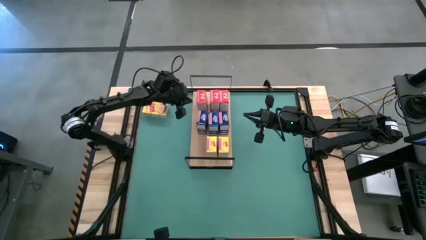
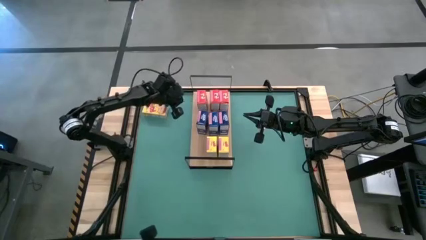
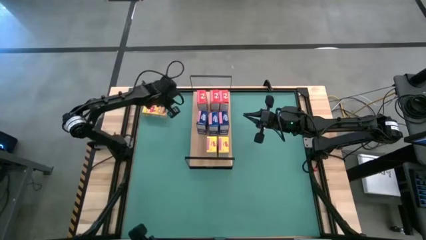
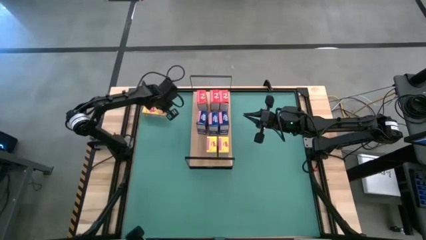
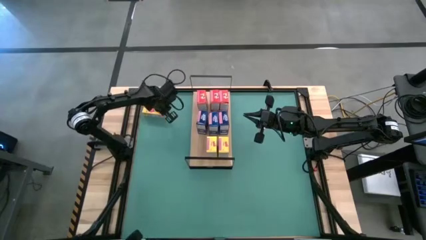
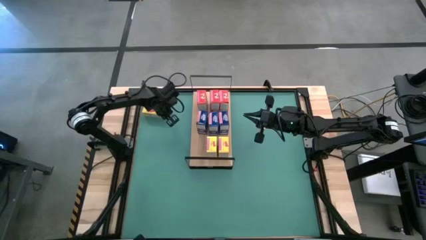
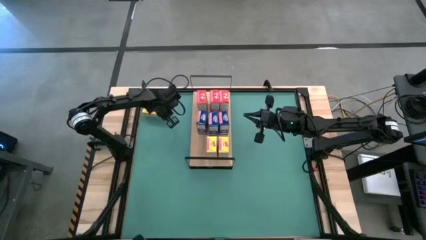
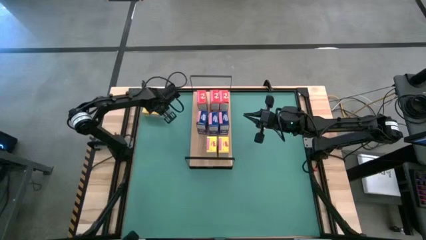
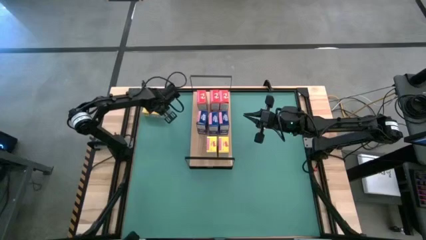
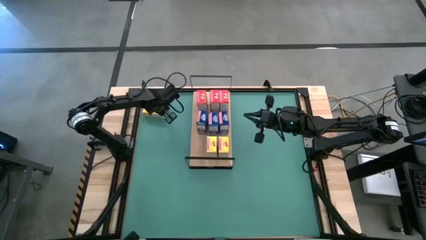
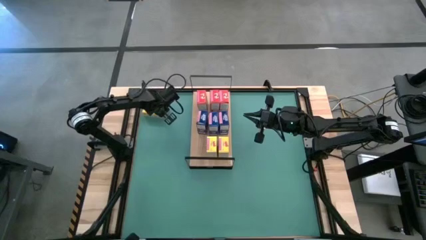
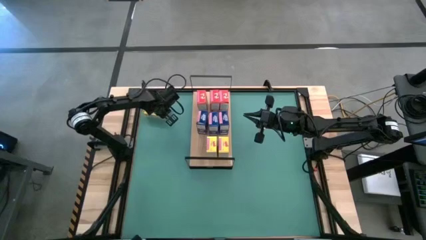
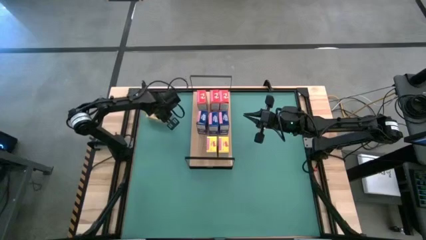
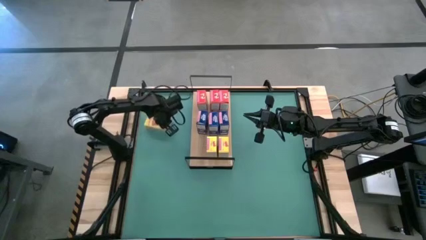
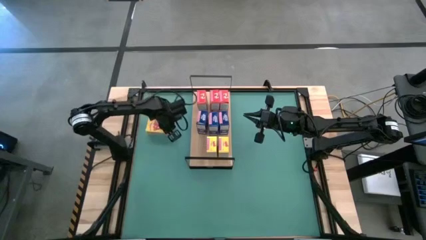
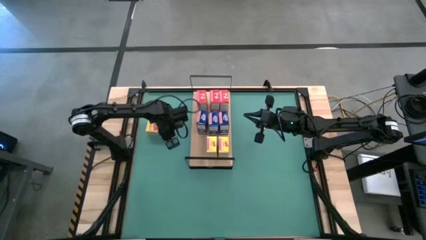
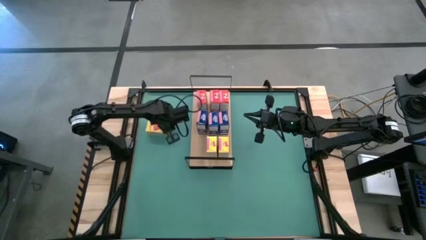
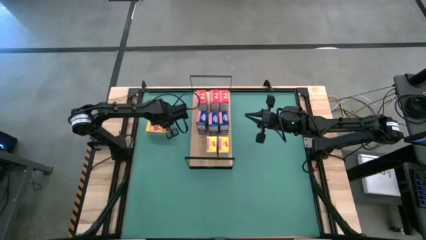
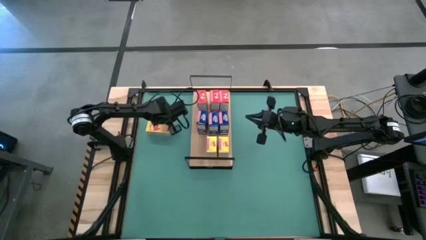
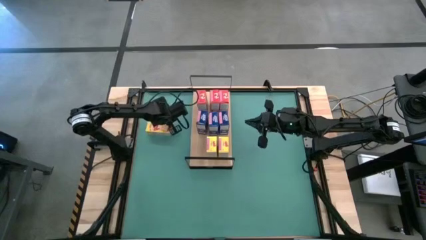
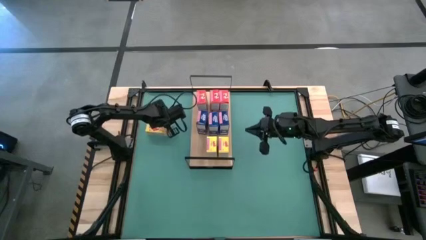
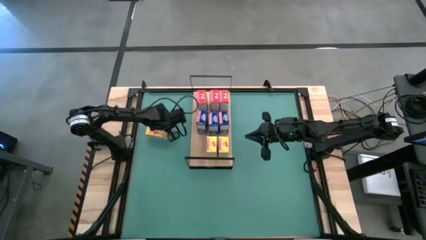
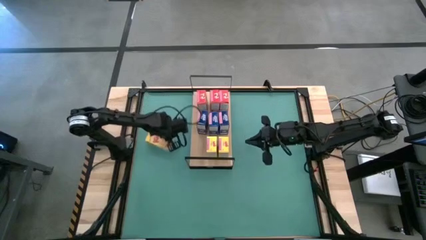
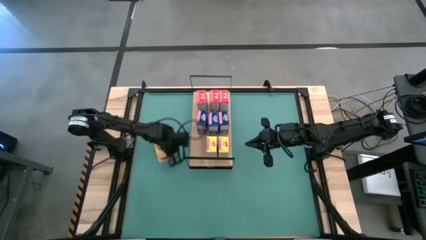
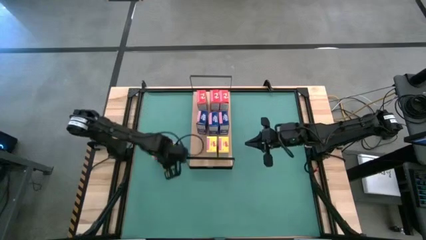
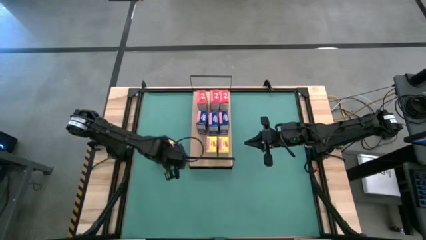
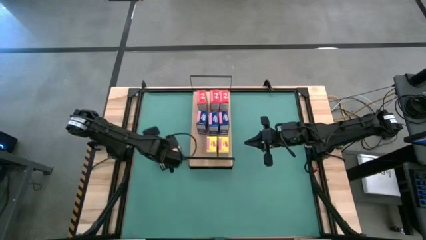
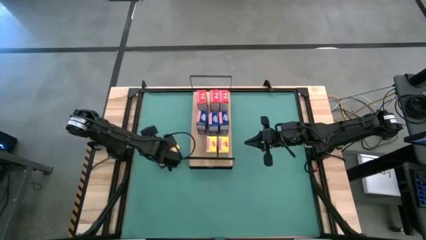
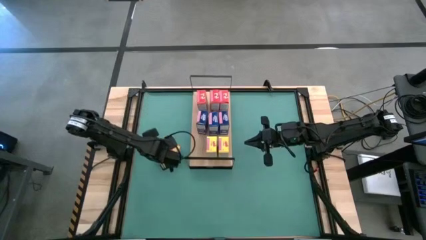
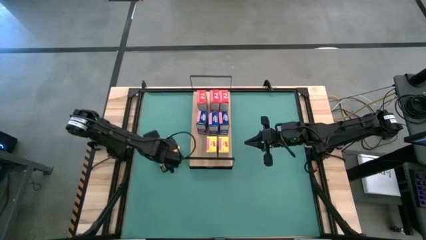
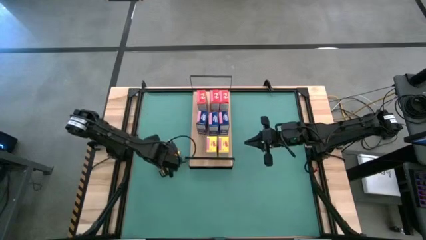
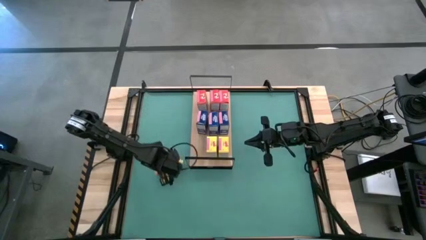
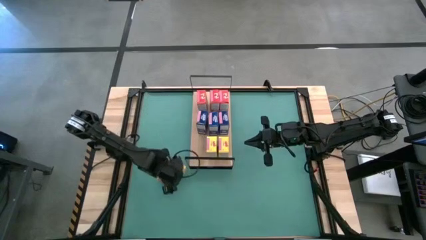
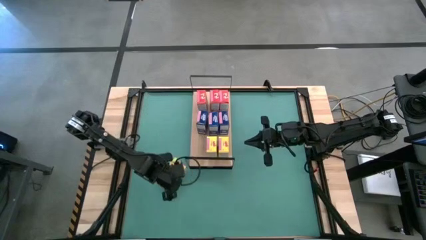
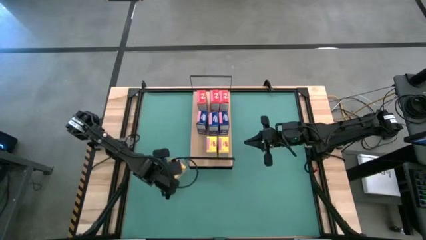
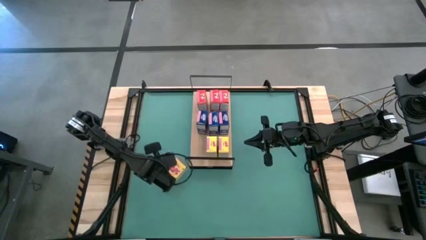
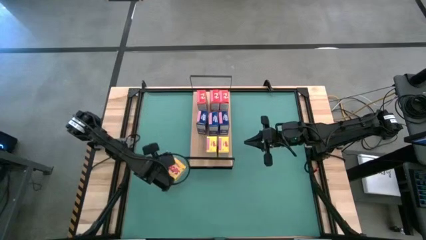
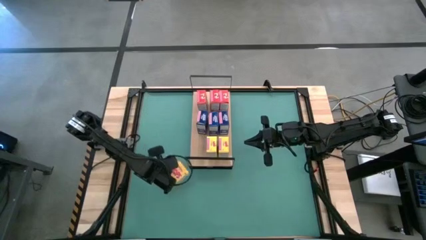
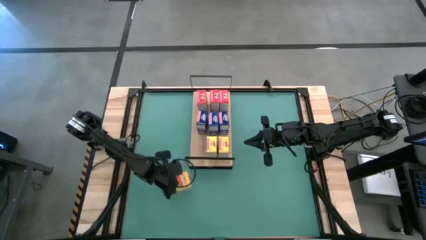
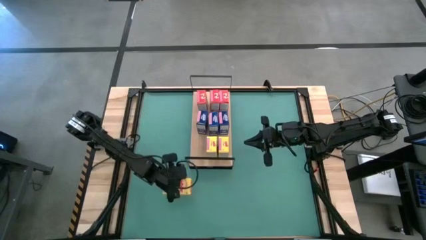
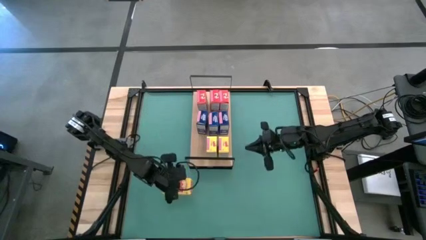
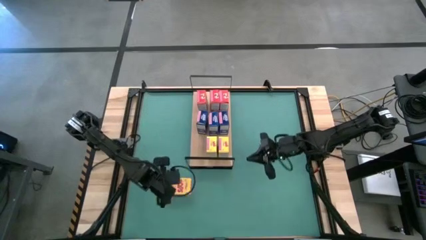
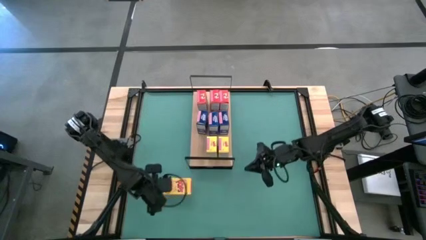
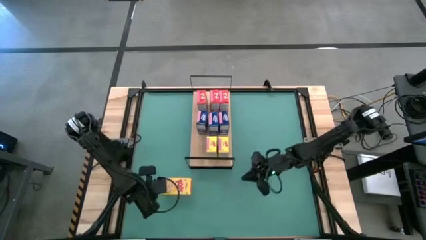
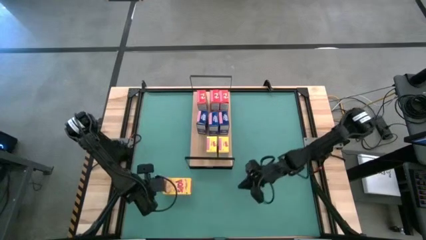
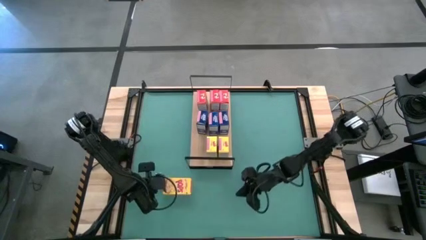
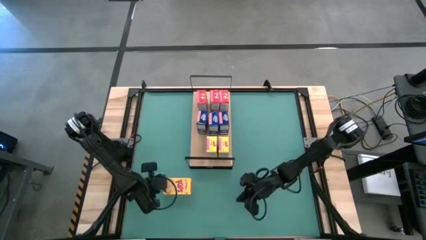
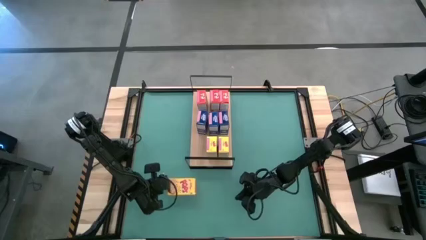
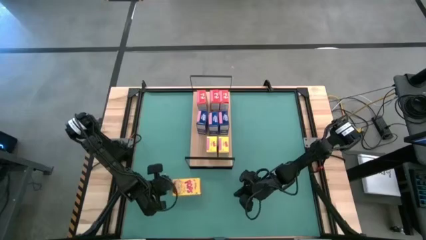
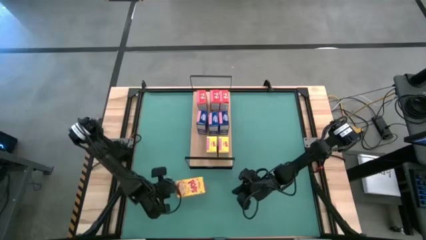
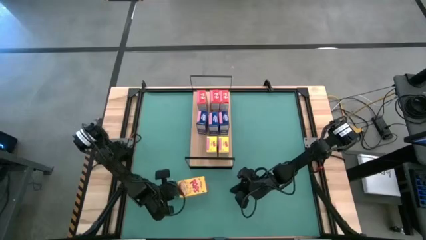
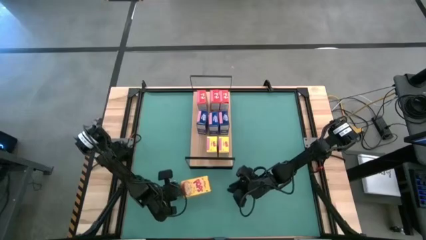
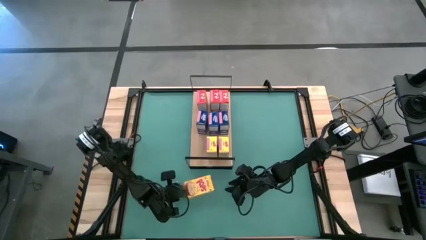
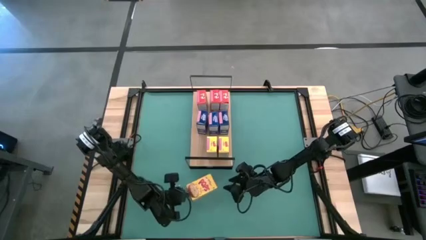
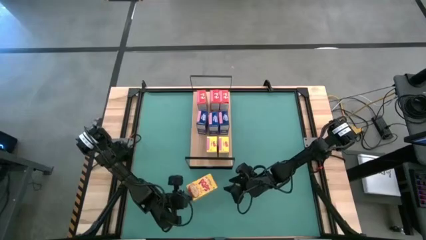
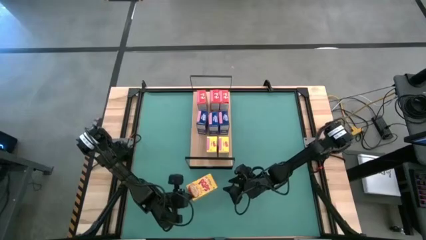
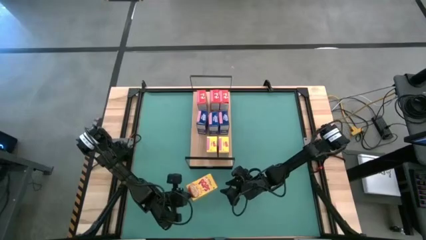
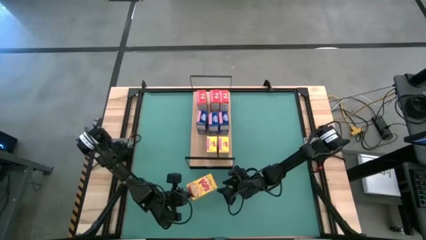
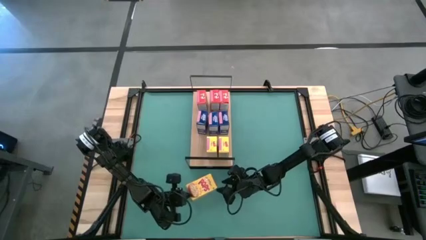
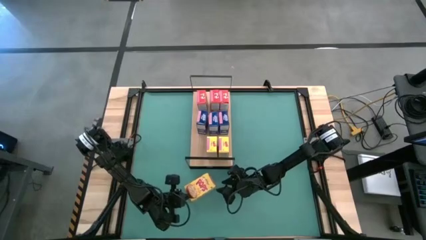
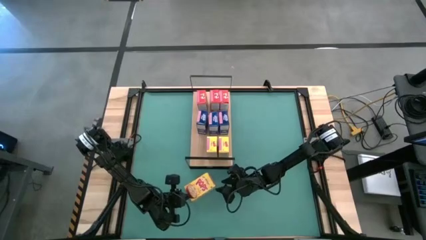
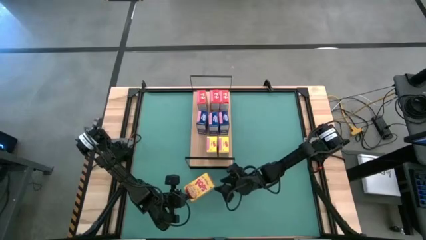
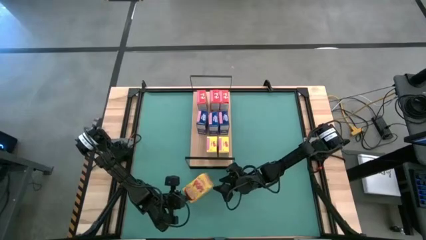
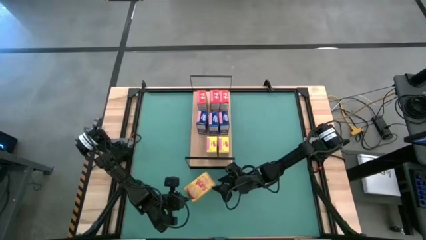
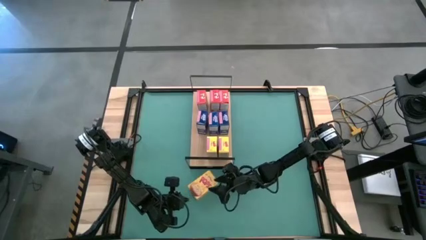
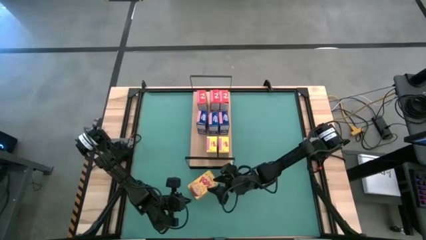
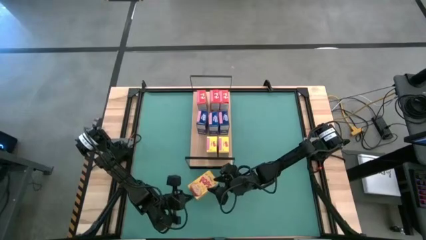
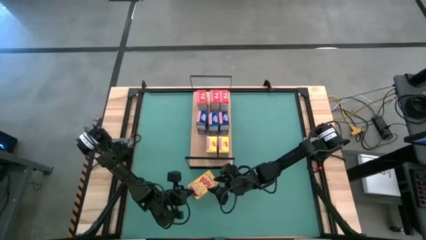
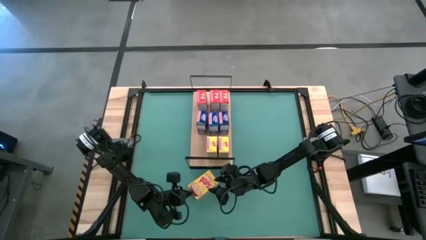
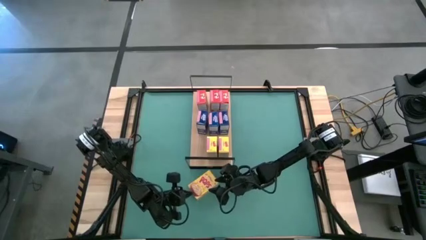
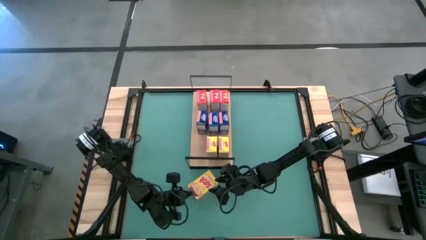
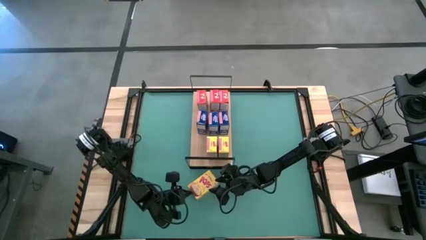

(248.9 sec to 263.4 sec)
Task: Stack cereal on shelf
Put the yellow cereal box on the shelf and align it with the other yellow cereal box

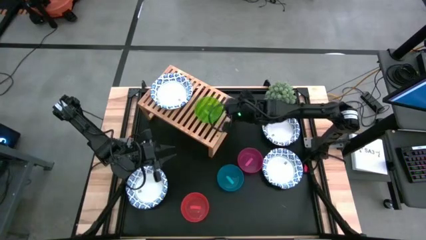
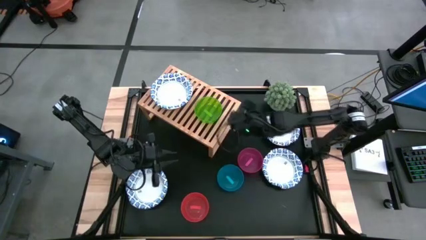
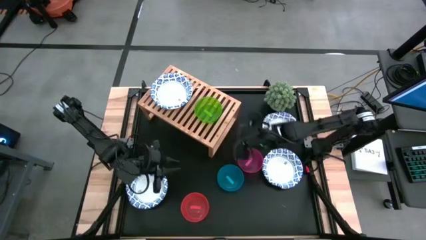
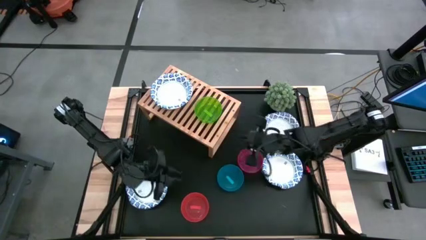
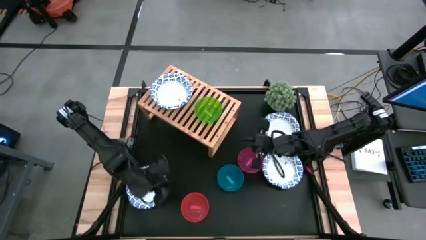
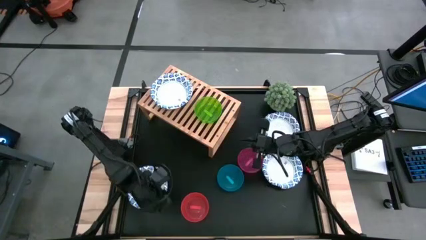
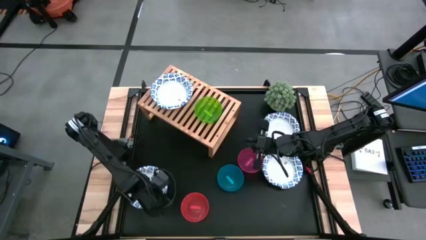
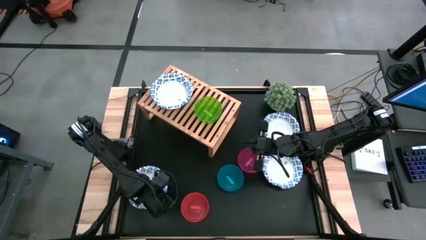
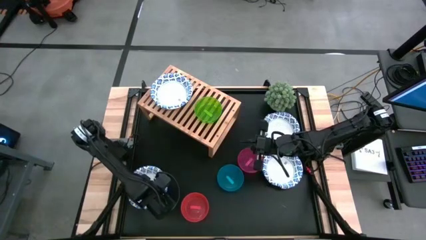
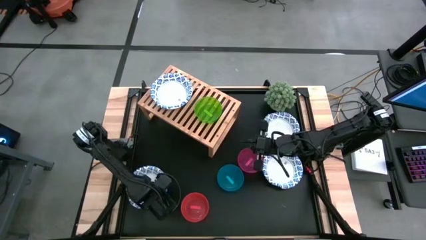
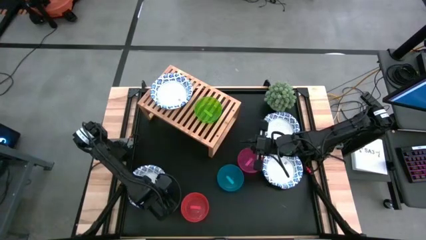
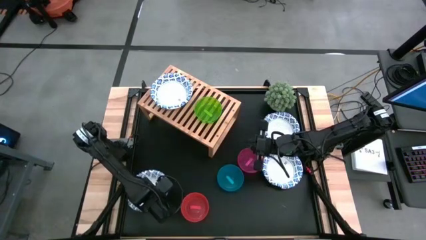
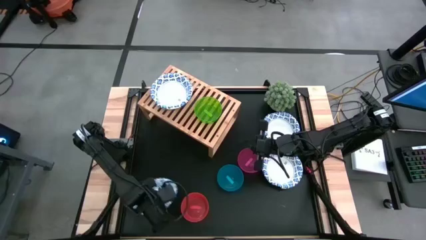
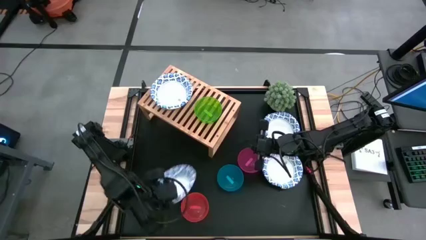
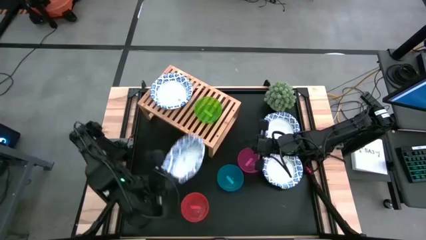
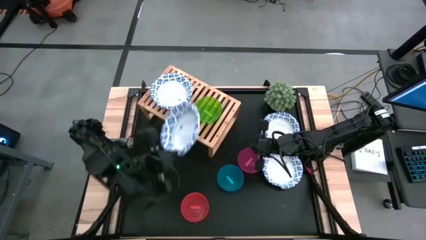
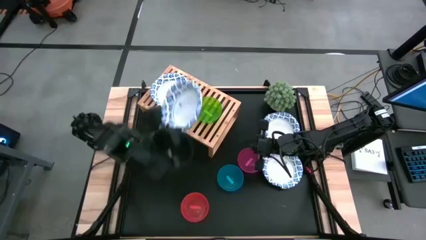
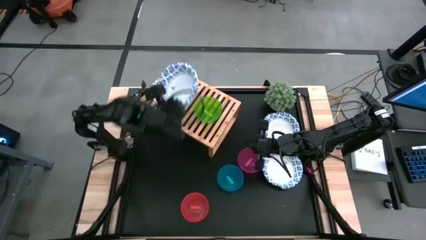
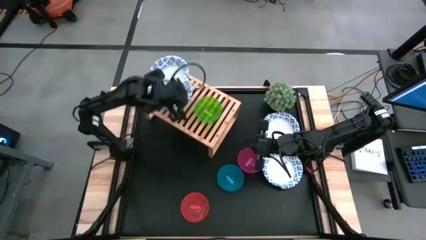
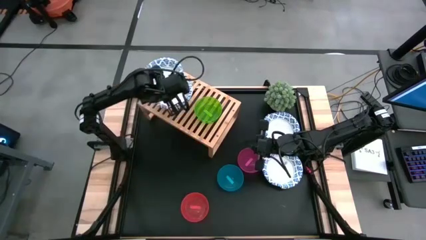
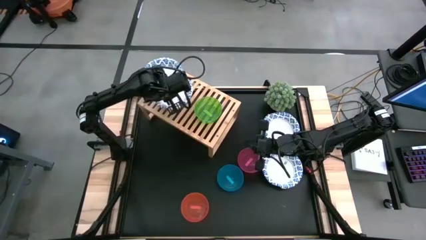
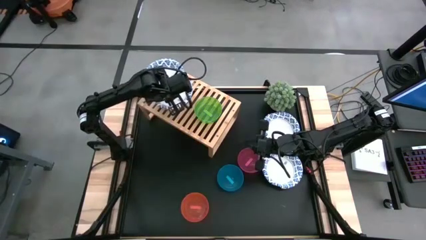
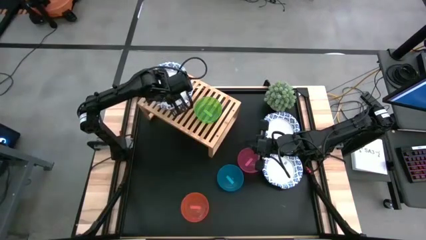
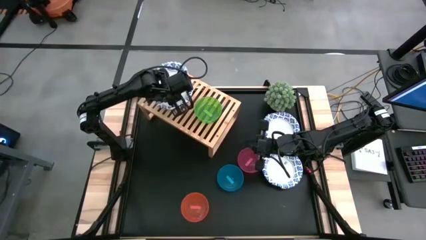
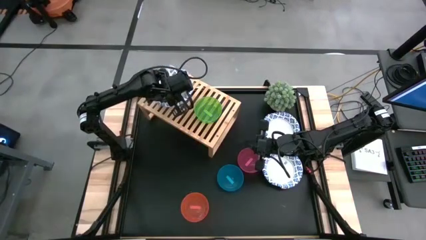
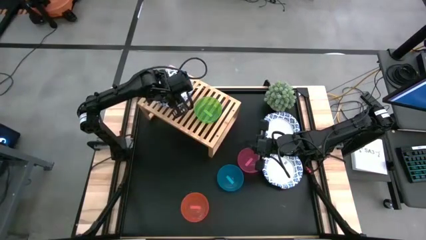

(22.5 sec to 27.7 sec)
Task: Place and stack bowls onto a shelf
Stack the left white patterned bowl into the white patterned bowl on the shelf
